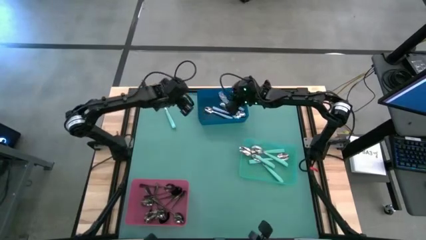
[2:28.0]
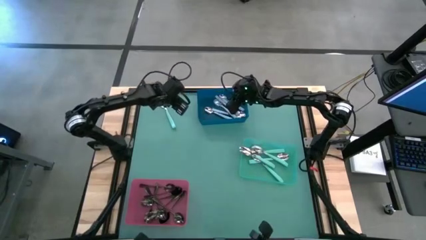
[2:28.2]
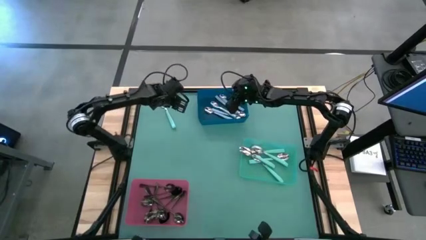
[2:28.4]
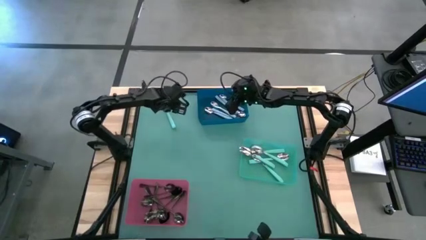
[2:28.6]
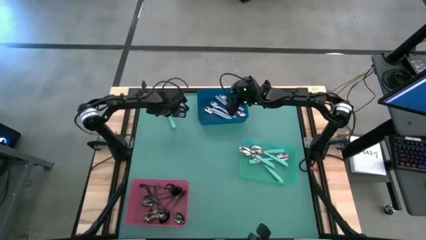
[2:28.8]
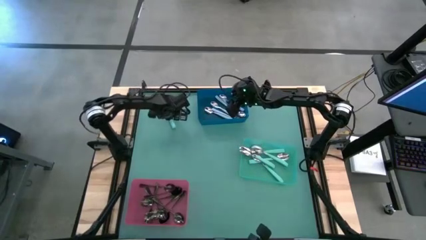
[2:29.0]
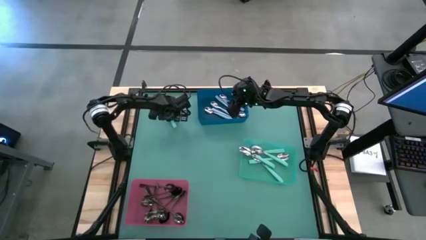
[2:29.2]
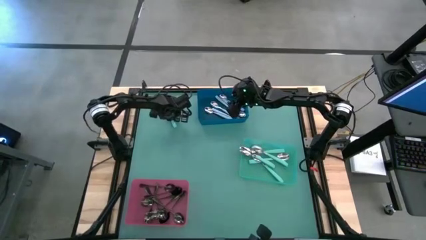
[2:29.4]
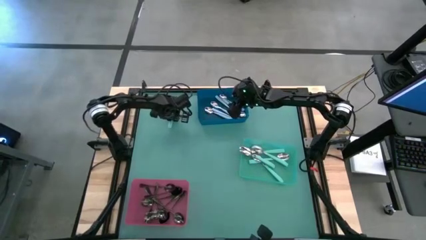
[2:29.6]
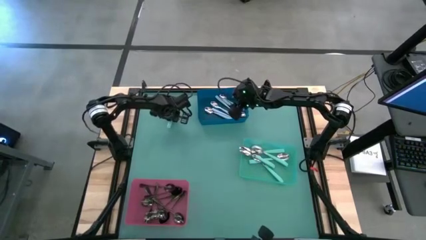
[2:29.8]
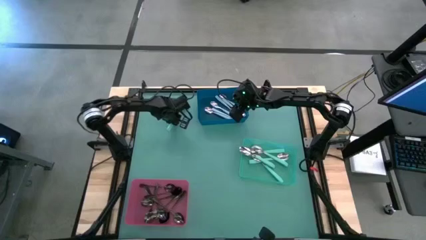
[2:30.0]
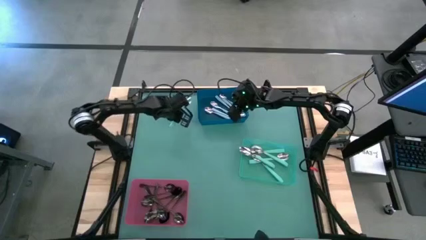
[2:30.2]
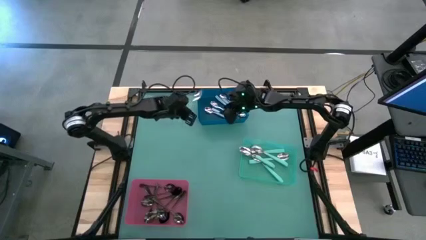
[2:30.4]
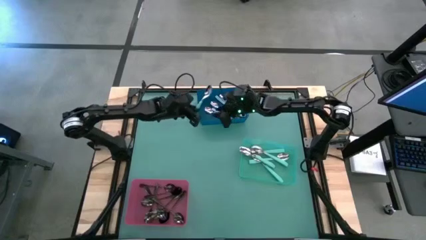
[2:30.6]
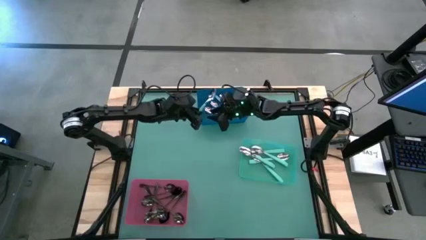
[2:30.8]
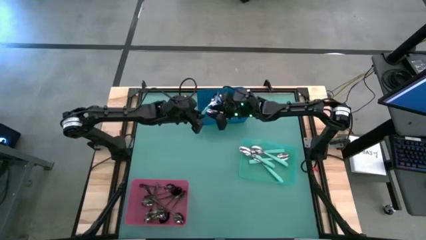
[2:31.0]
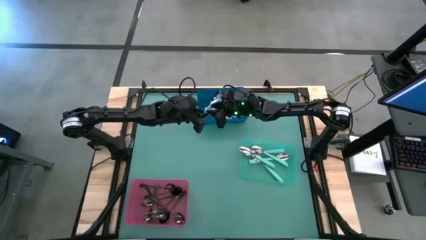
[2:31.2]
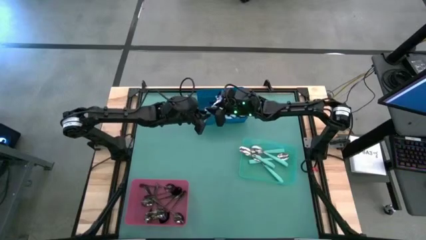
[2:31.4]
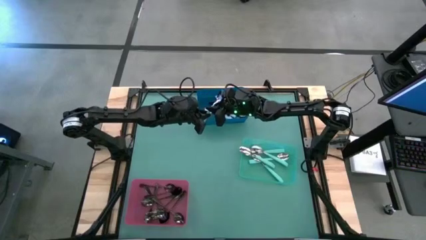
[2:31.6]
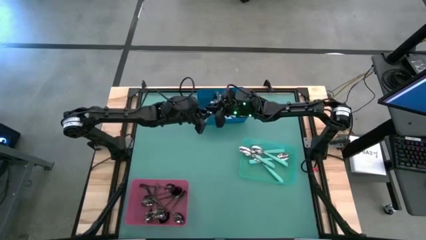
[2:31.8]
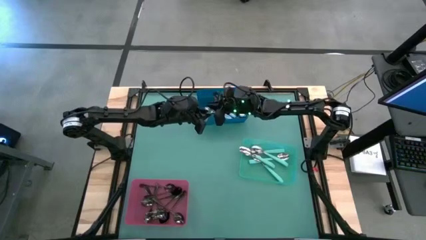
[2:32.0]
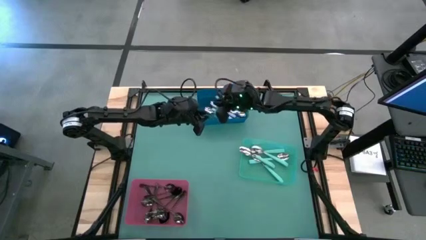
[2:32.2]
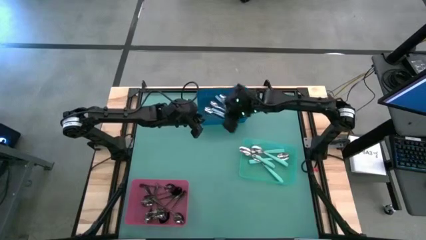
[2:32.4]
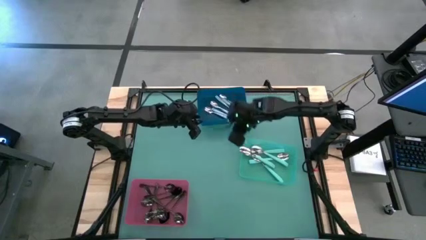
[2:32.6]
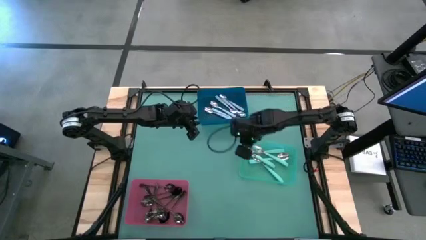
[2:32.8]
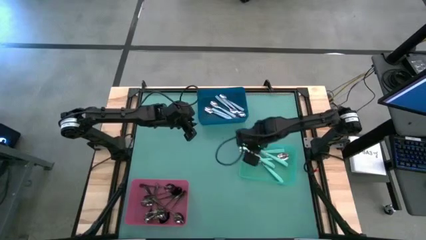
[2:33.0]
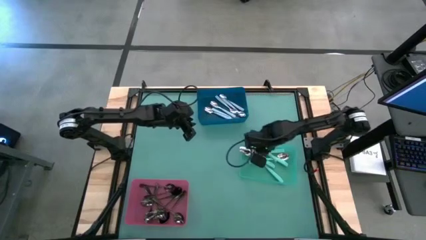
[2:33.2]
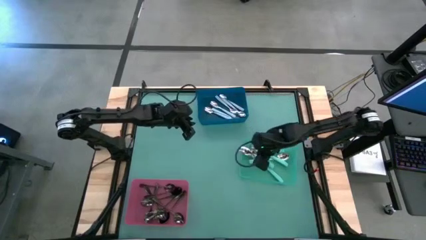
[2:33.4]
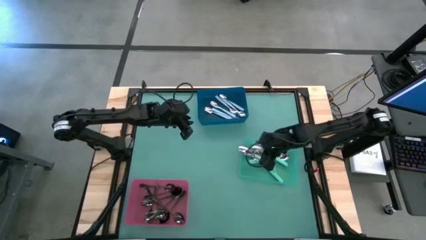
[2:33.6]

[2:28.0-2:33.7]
Task: Sort silverware by color (type)
Put the green spoon into the green bin

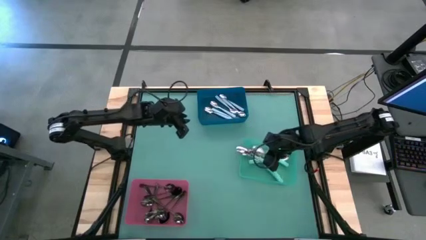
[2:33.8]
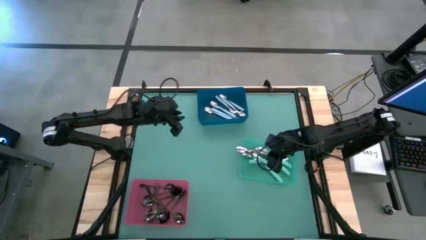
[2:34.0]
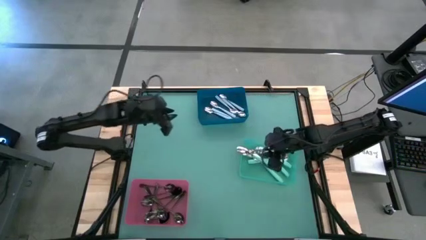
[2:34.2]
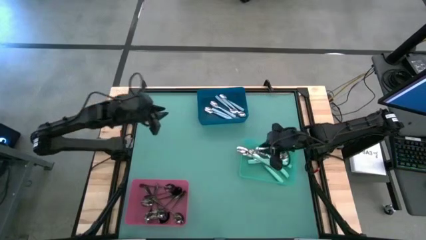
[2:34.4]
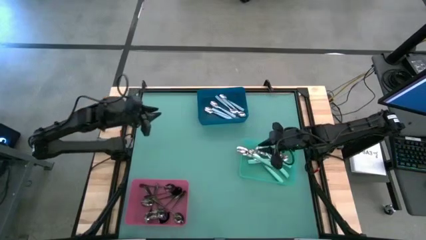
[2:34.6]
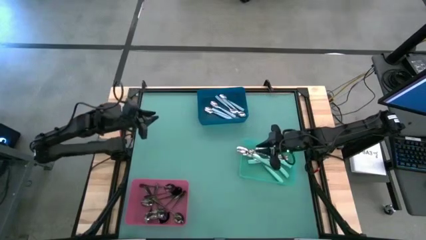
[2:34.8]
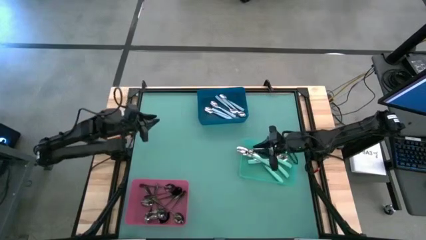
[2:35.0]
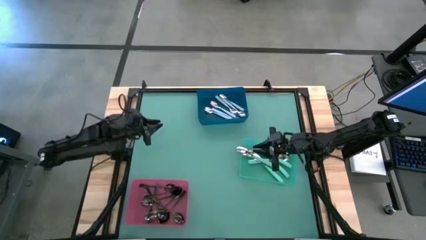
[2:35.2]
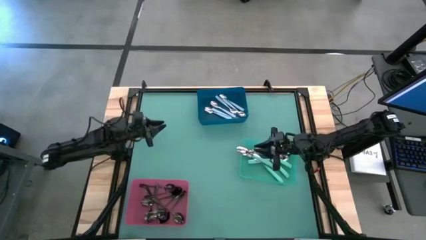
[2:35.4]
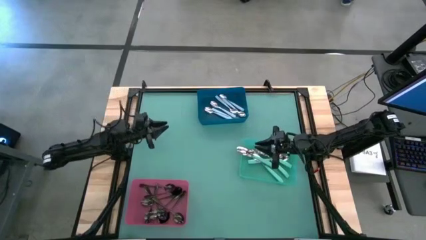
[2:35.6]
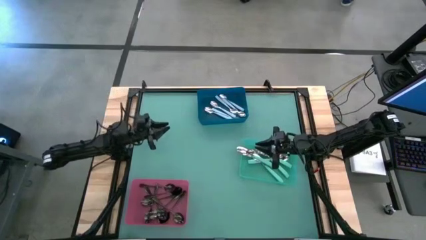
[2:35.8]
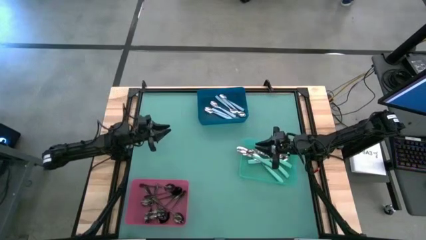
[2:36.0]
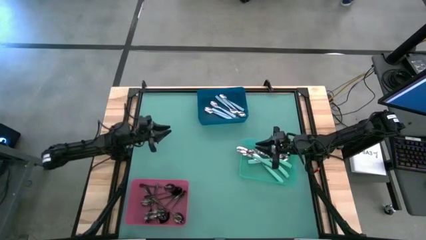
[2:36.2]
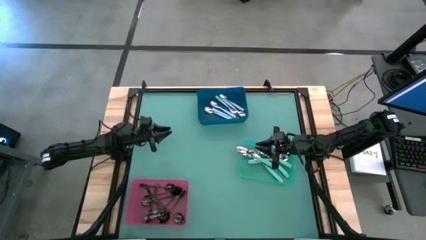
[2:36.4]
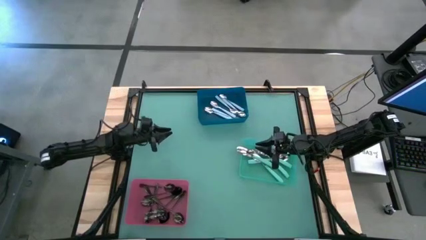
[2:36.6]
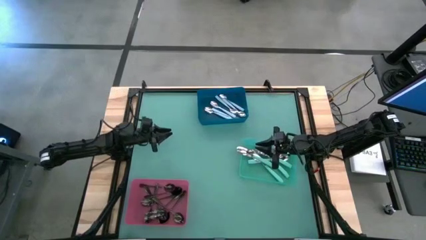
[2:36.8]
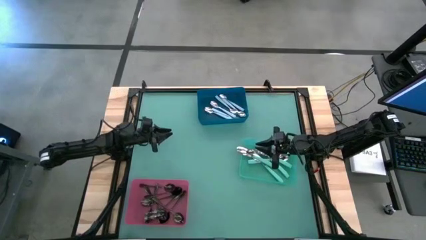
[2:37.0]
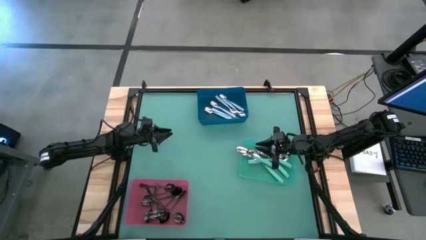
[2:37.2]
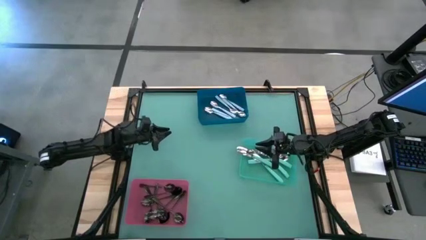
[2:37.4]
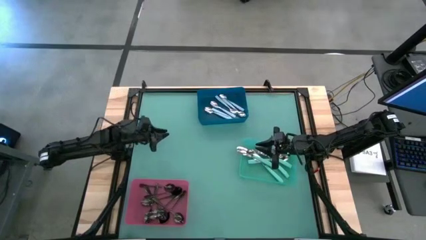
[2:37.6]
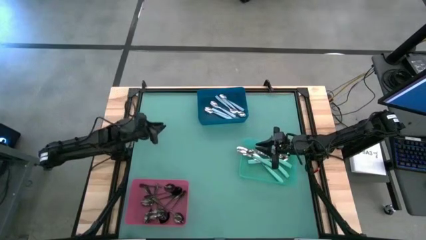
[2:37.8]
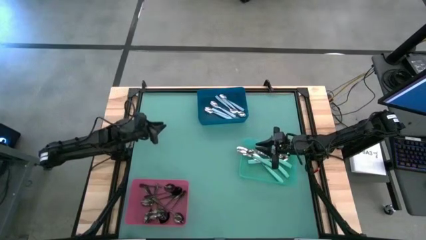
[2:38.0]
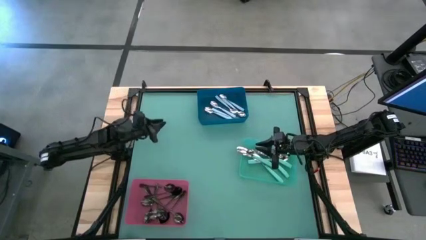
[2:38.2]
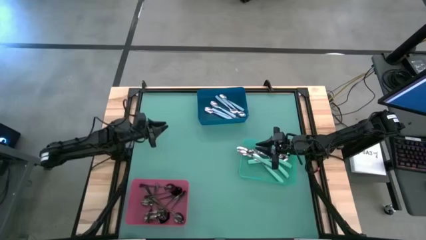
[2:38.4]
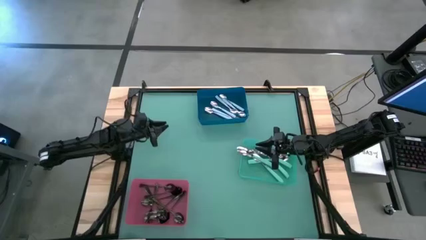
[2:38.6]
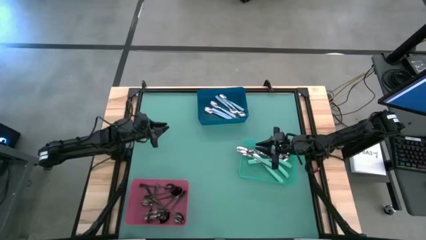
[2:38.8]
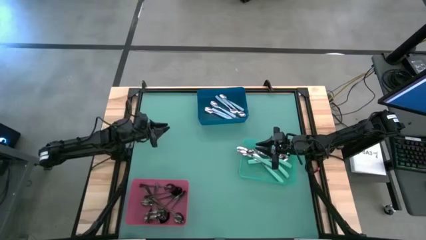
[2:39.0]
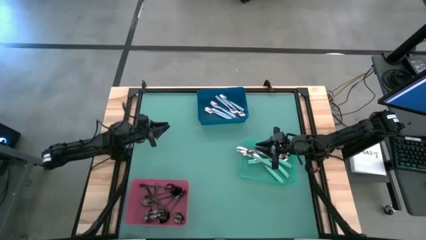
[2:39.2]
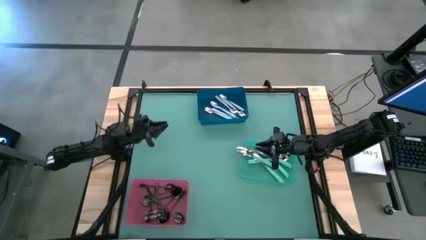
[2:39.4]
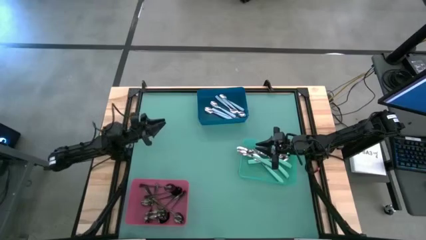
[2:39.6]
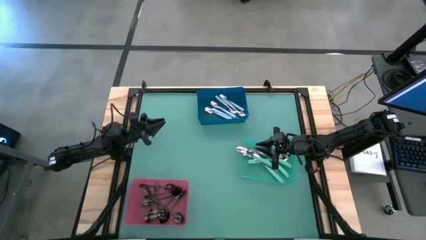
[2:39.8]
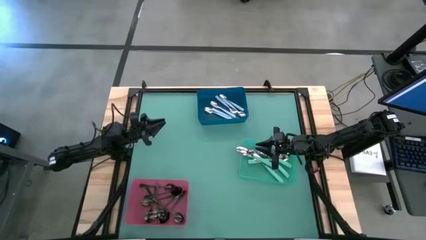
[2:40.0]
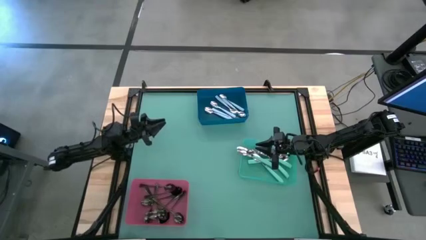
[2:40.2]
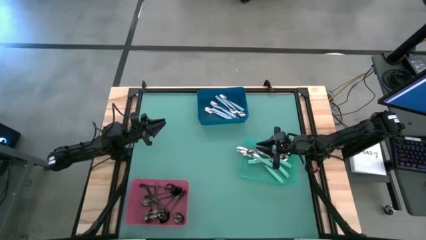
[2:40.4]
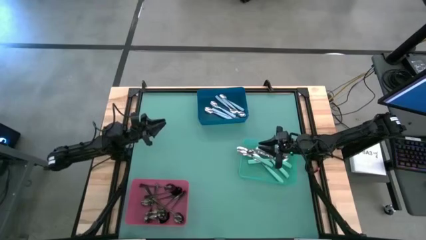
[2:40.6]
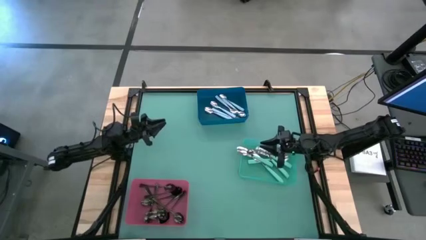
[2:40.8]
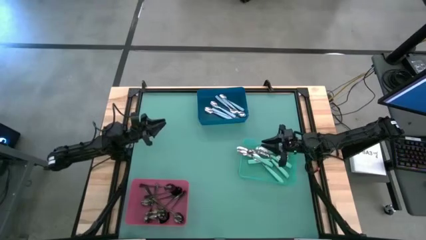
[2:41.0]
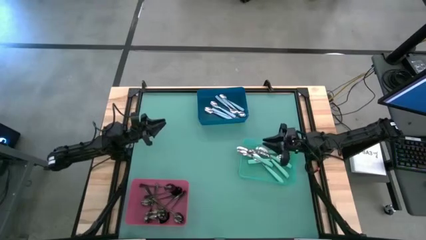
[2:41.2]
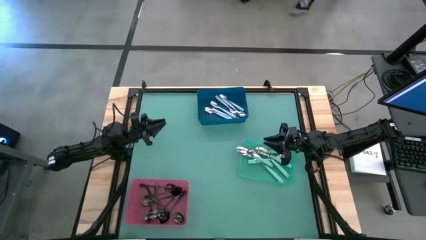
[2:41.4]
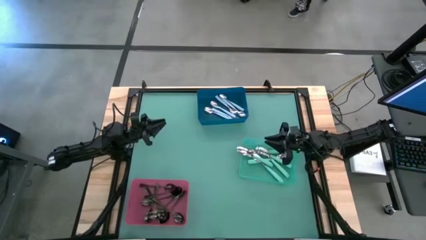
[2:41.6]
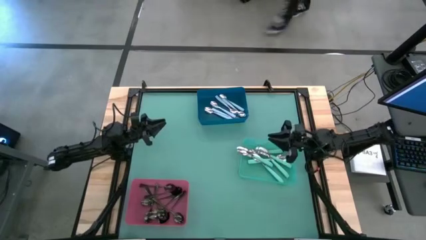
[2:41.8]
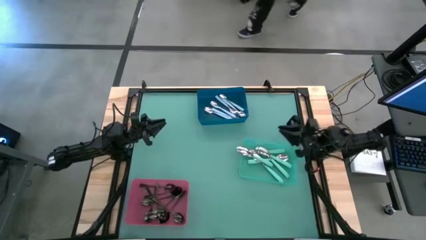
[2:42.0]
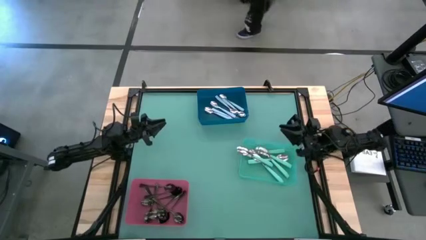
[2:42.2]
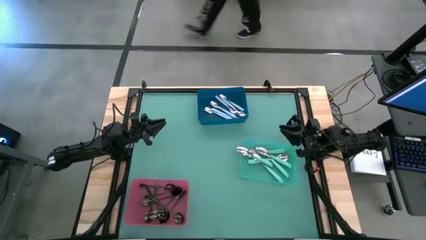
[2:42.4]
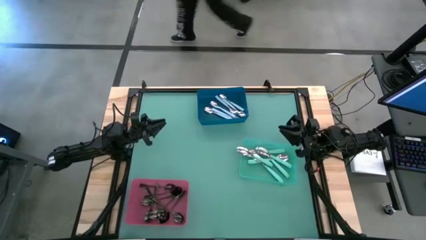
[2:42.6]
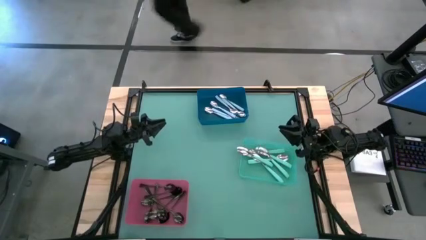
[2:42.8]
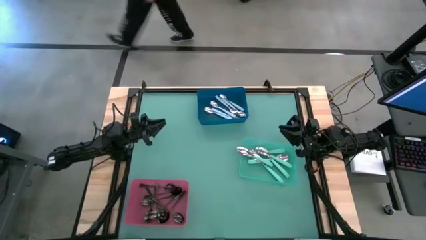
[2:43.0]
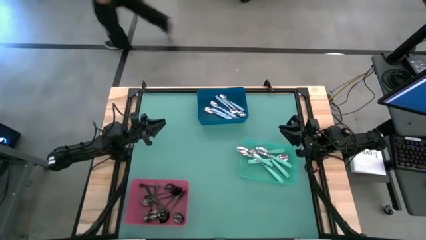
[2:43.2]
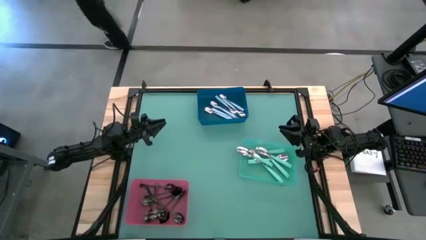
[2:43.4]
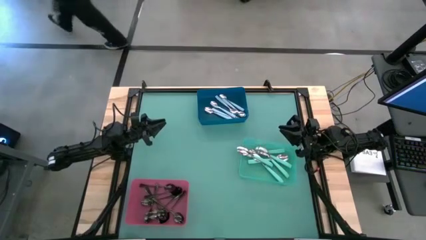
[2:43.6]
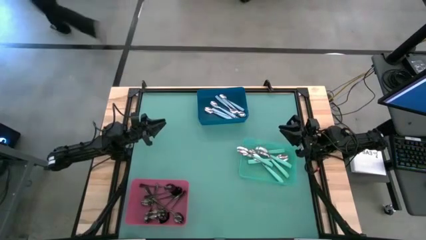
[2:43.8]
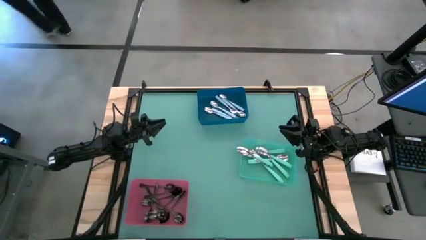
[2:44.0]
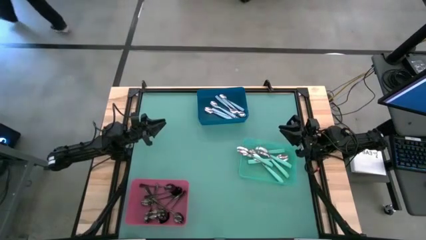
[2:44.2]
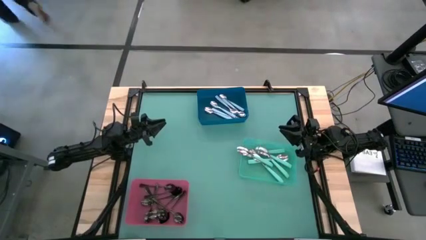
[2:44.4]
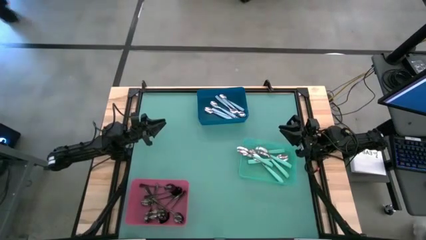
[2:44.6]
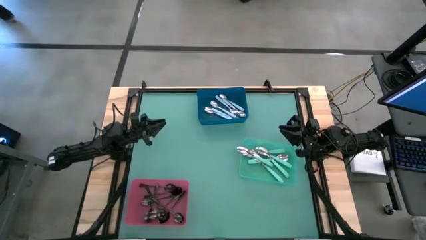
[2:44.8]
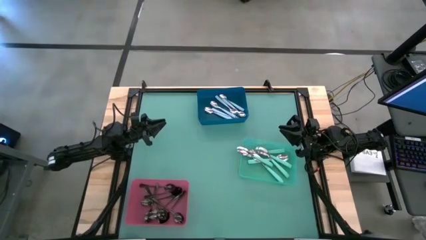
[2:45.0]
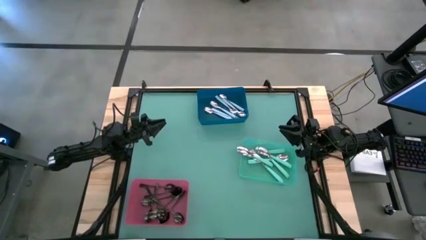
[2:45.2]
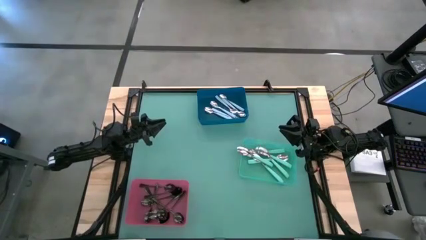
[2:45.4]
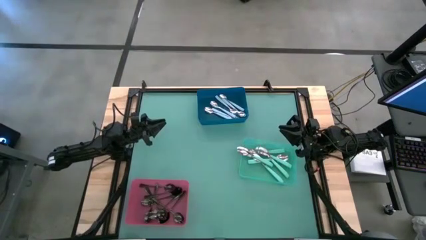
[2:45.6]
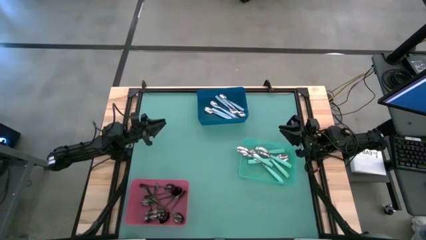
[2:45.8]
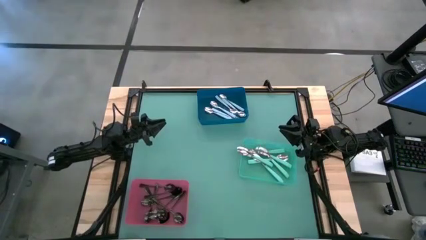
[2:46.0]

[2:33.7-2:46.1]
Return to Home Position
